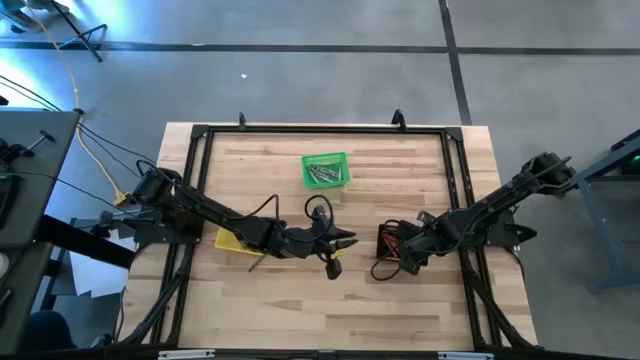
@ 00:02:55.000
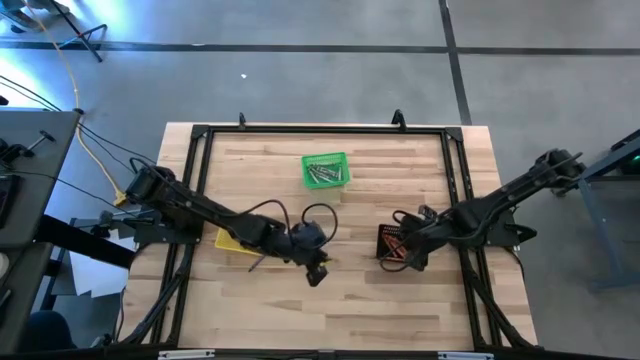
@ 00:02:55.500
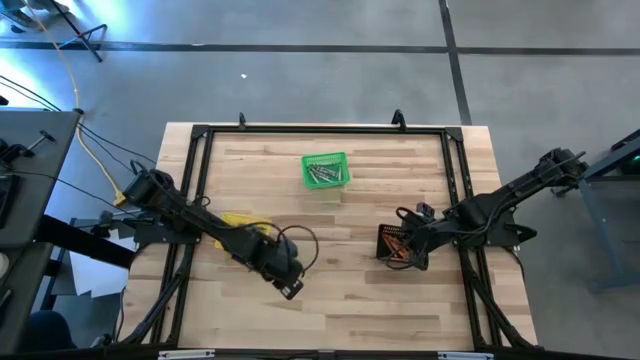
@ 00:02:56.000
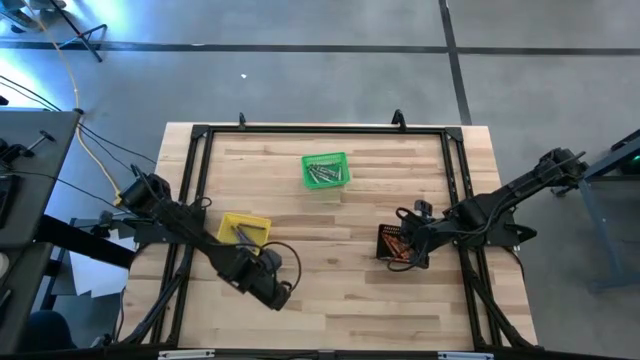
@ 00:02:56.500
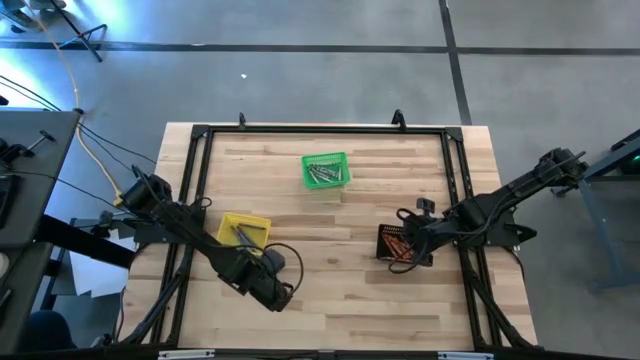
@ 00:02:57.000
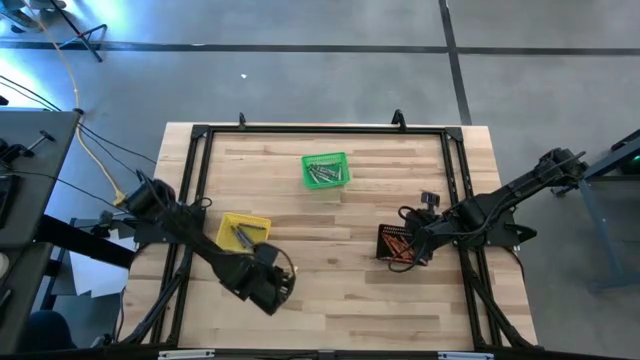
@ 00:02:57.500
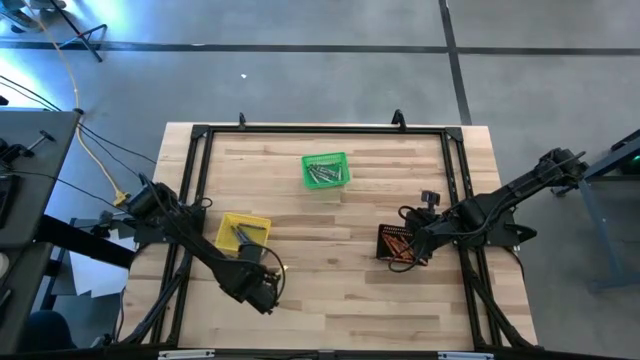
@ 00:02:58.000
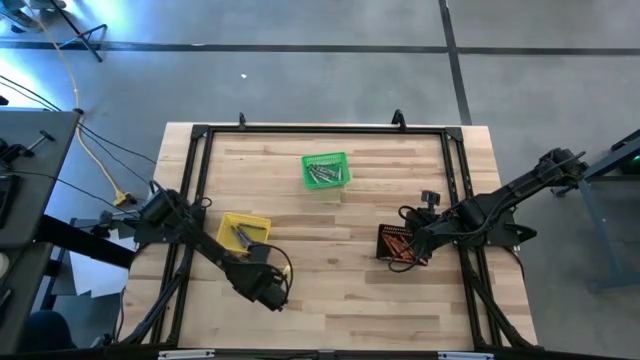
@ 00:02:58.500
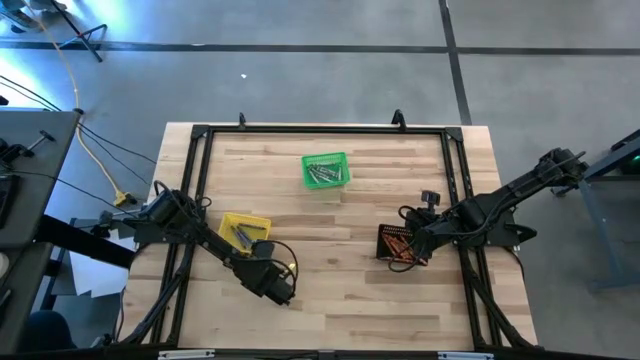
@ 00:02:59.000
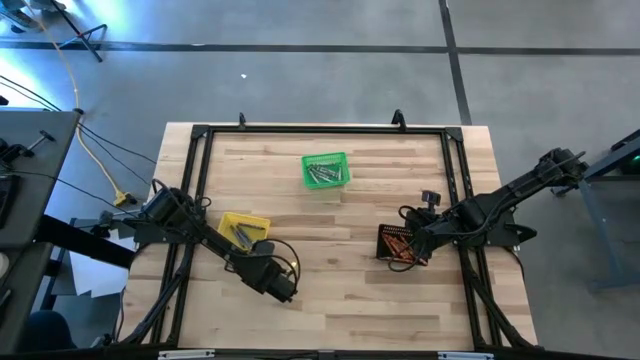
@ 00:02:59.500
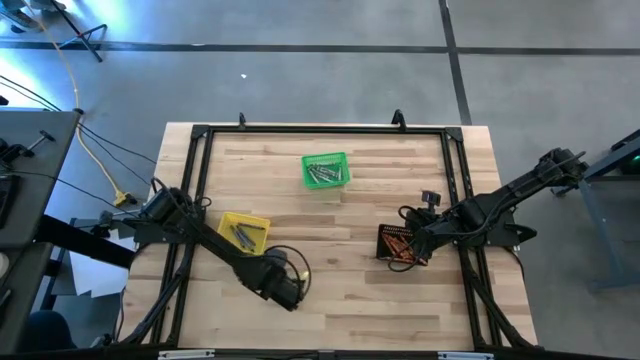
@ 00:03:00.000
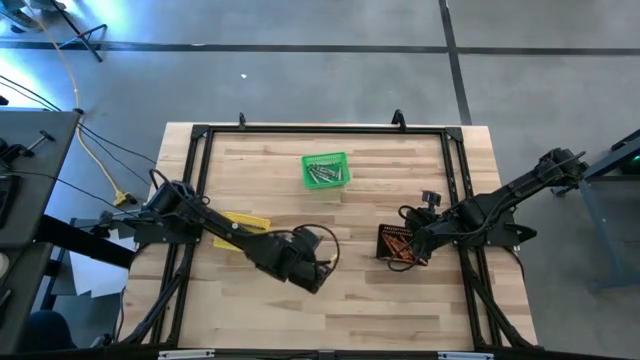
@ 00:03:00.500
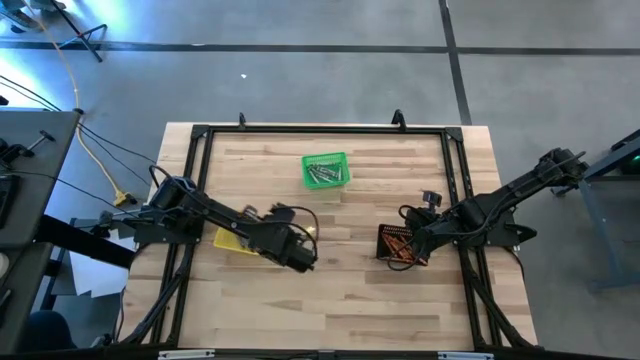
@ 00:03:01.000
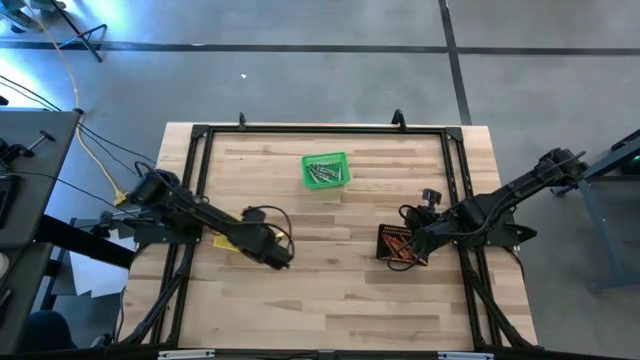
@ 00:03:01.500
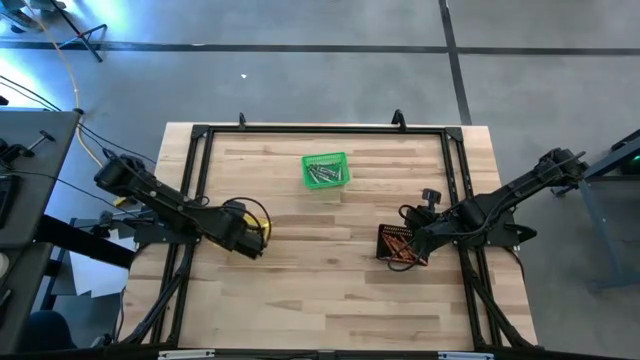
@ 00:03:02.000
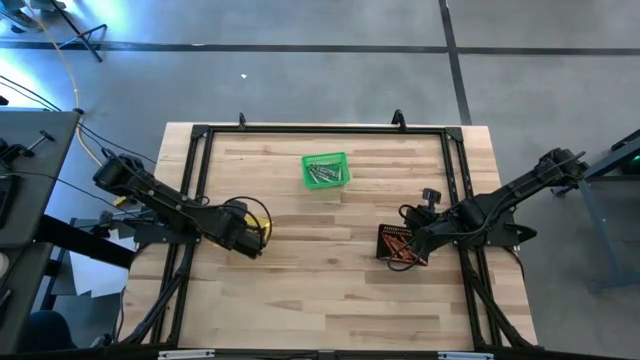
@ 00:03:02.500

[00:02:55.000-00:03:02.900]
Task: Sort crayons
Put the blue crayon into the yellow basket

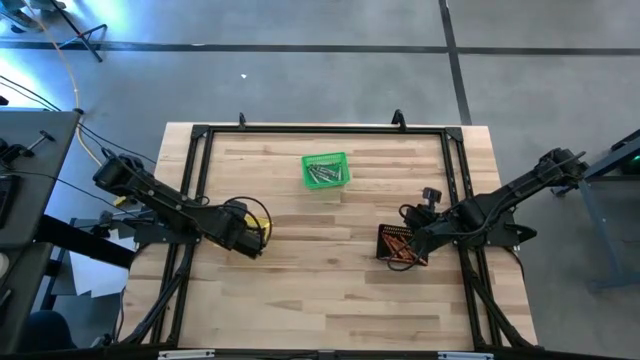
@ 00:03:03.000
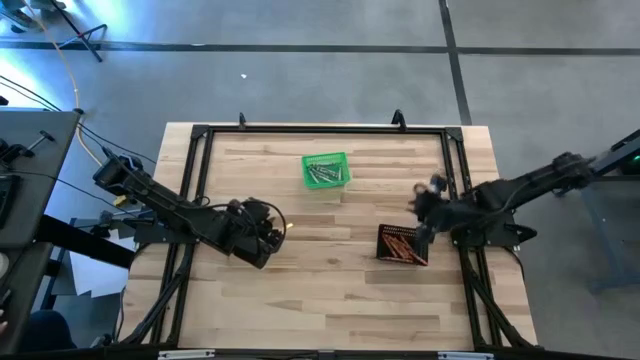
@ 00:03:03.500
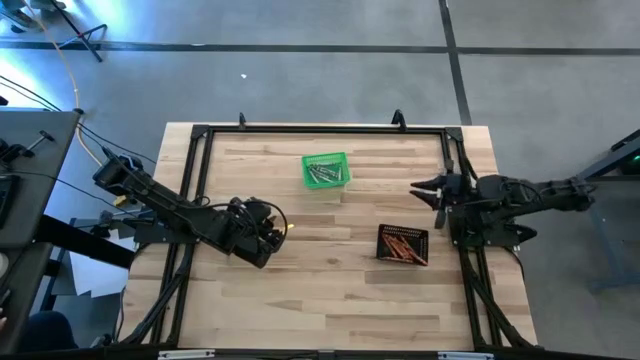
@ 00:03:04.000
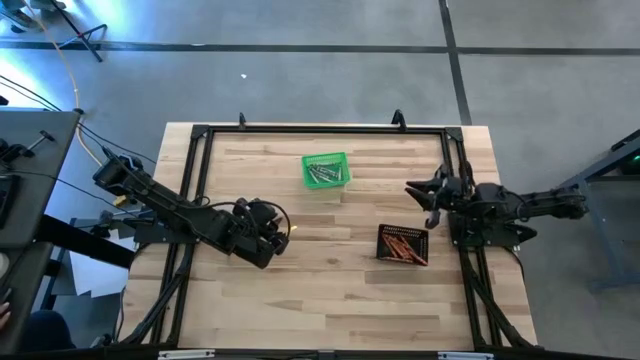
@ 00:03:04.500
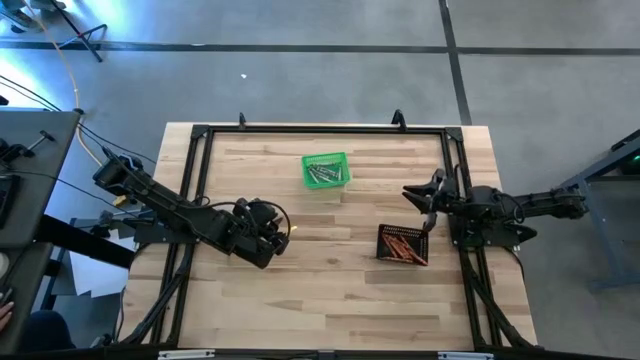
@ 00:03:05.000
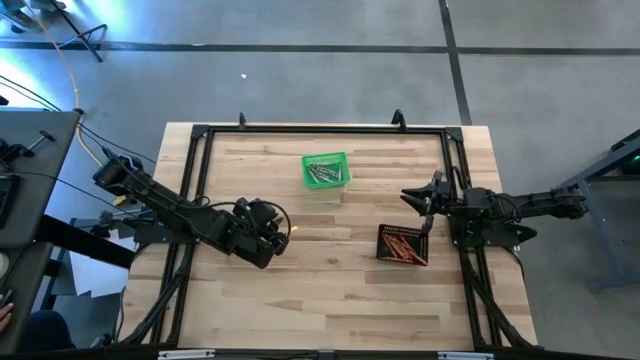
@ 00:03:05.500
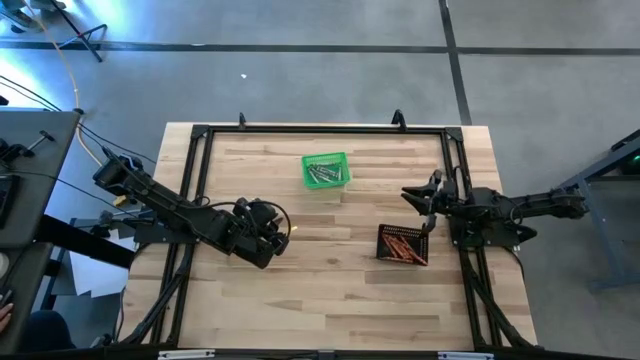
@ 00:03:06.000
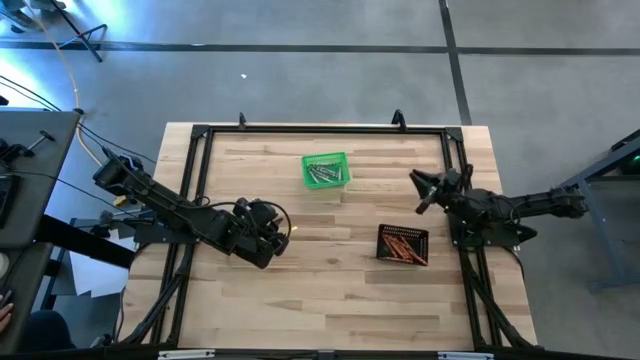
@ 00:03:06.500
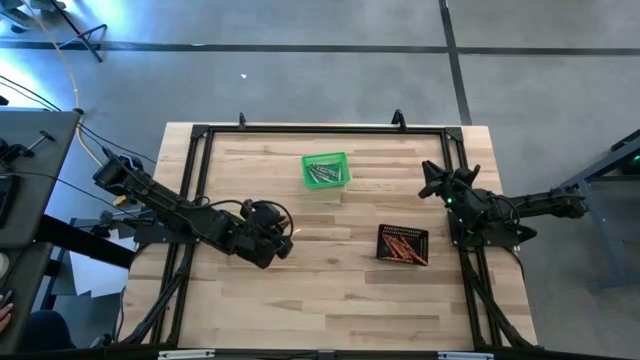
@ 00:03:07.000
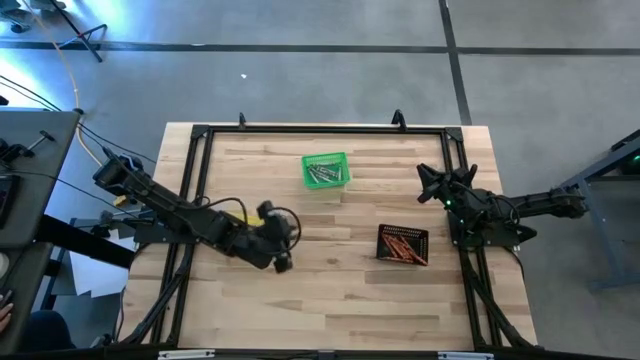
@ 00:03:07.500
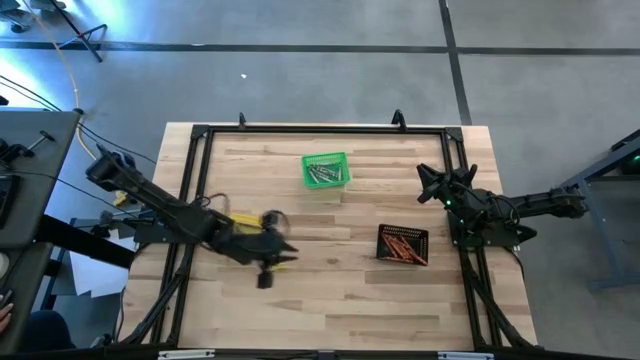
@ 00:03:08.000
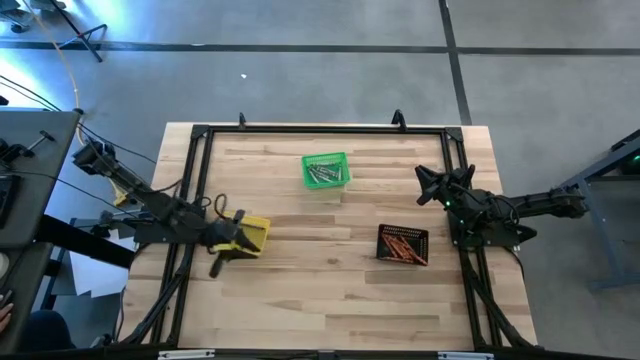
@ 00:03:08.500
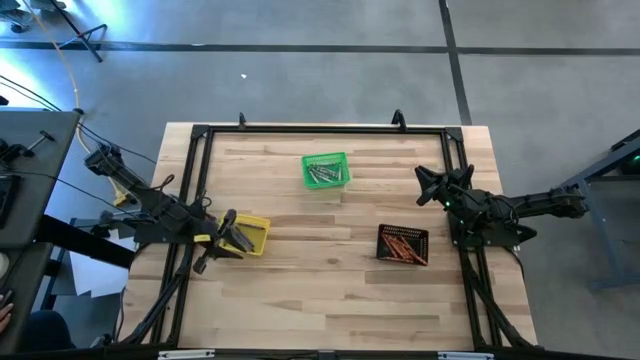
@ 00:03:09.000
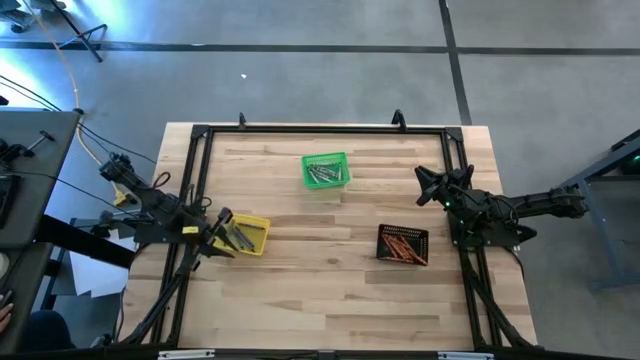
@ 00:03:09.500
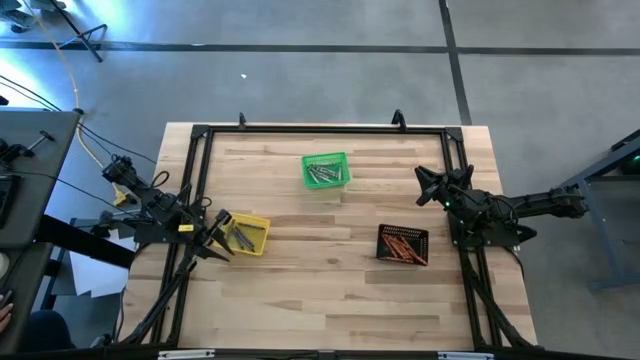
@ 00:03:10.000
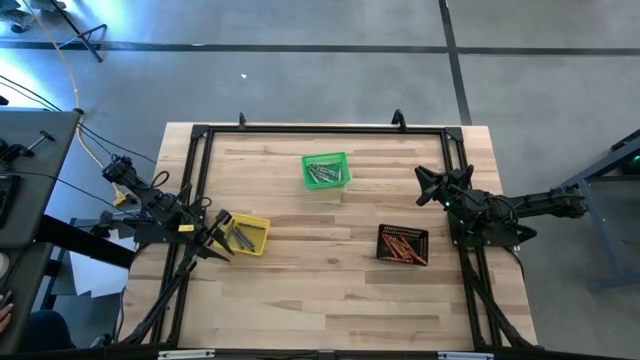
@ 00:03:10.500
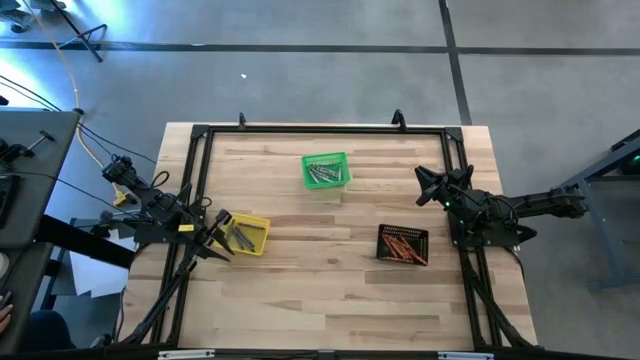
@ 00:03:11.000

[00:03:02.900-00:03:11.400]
Return to Home Position

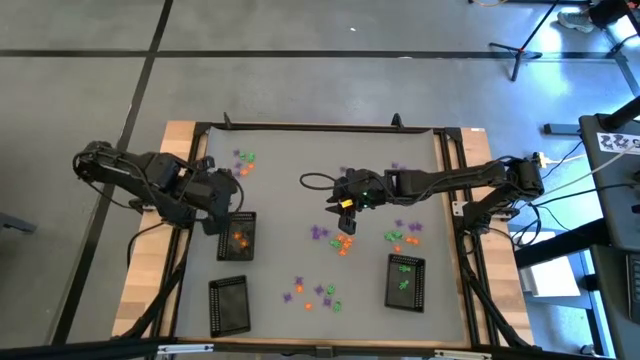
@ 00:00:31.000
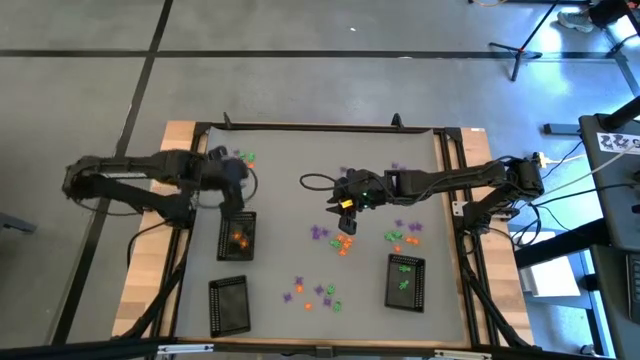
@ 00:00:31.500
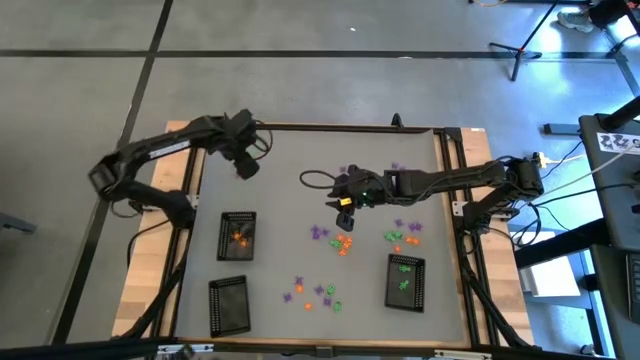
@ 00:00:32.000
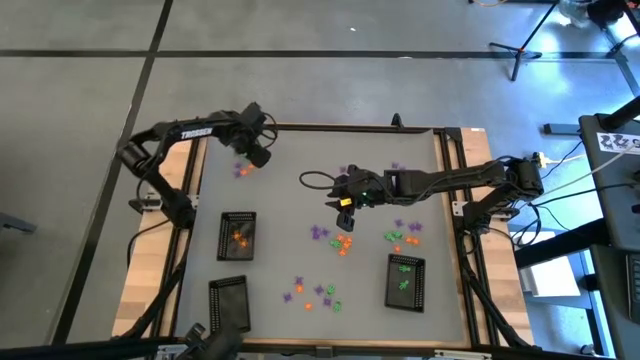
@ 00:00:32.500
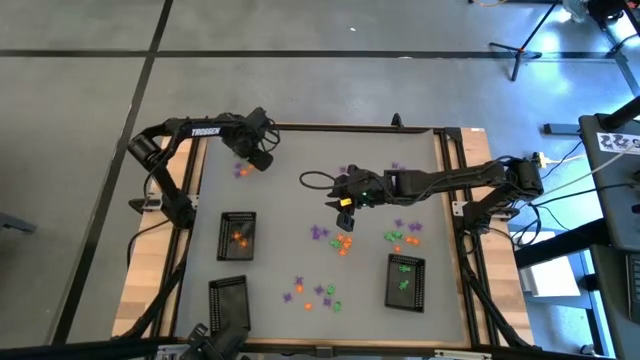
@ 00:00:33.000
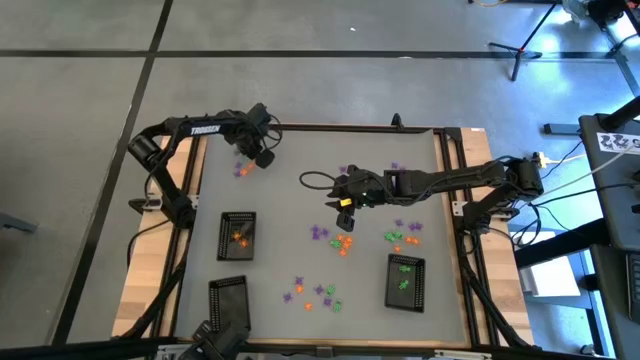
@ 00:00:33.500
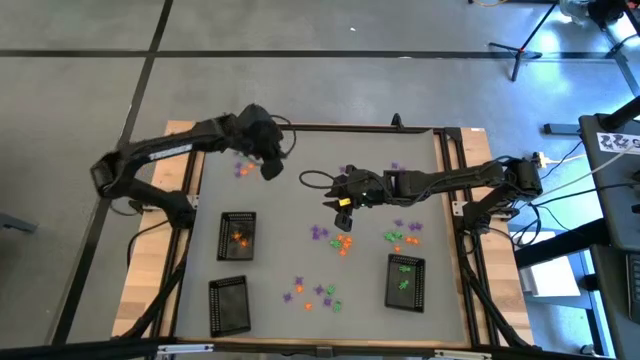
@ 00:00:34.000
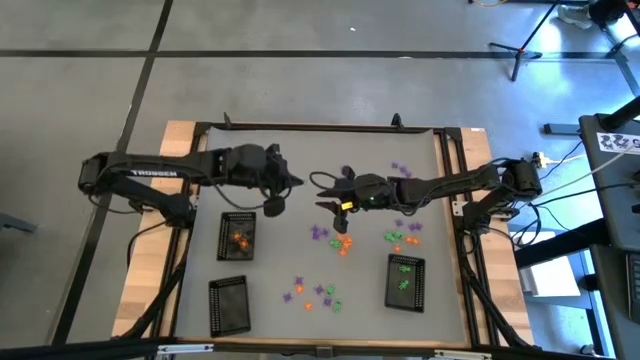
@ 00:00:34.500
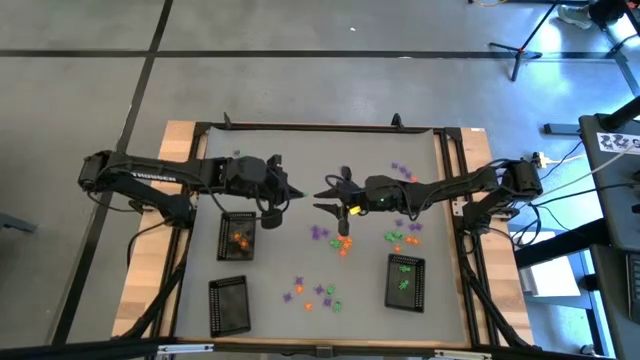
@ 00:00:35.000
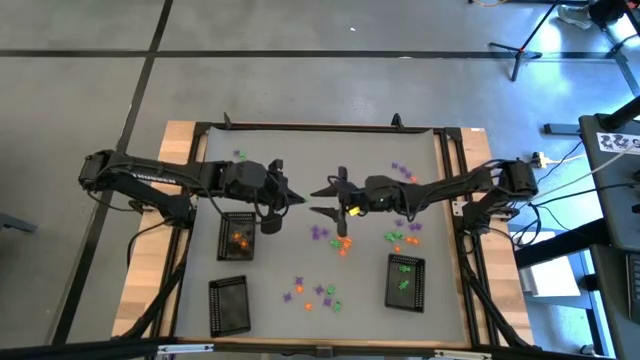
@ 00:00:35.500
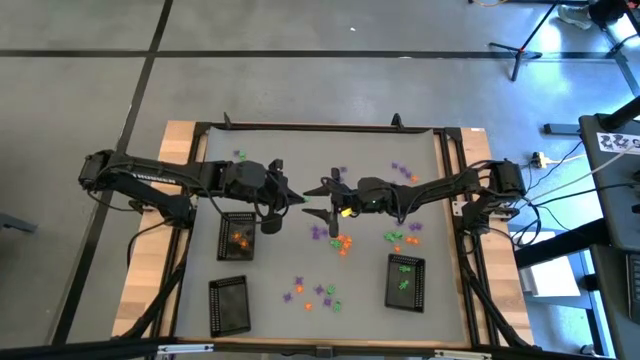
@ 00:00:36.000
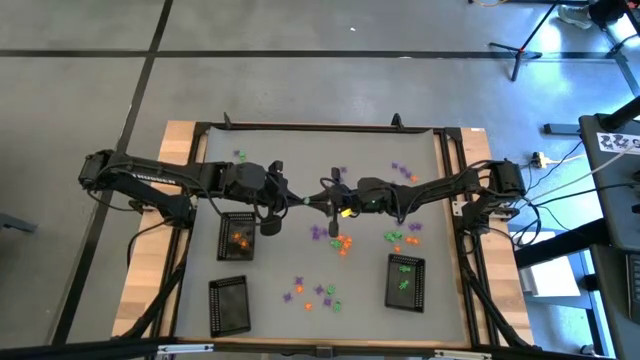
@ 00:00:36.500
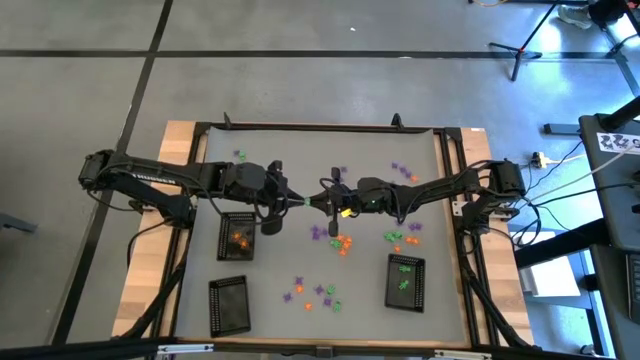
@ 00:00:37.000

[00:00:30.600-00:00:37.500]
Task: Sort Halloween decoration
Put the green skeleton toy into the bottom right black basket
